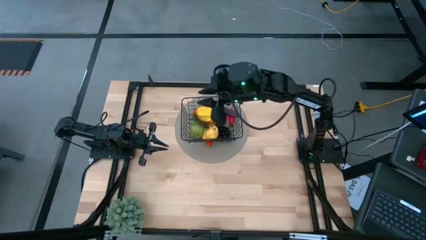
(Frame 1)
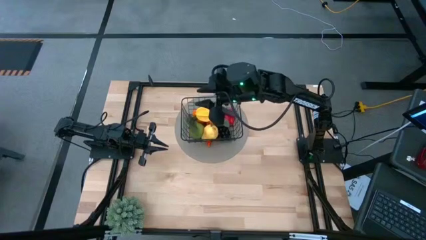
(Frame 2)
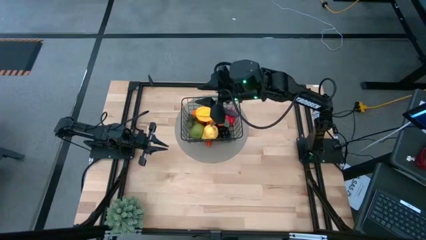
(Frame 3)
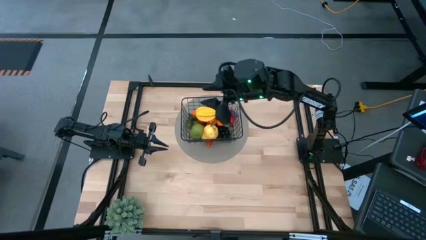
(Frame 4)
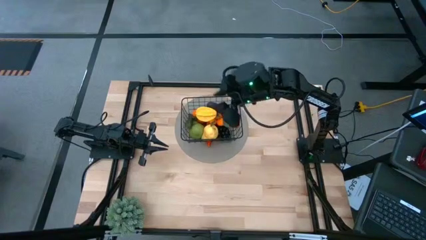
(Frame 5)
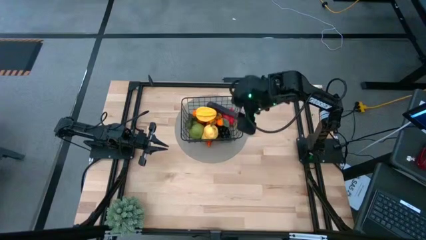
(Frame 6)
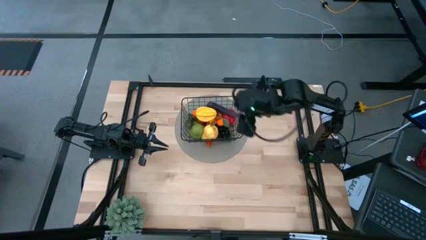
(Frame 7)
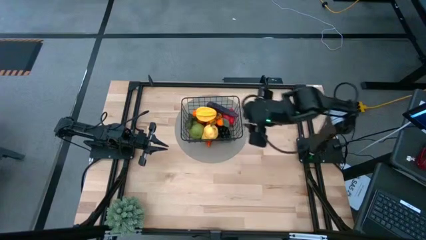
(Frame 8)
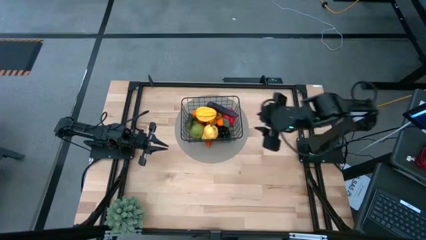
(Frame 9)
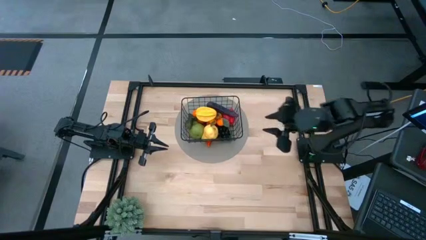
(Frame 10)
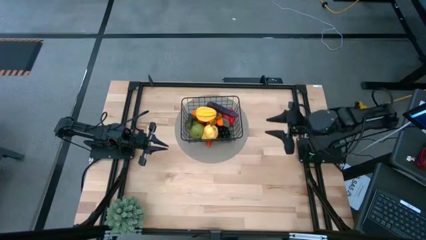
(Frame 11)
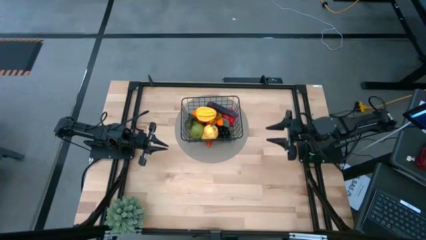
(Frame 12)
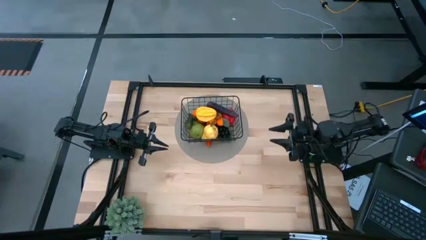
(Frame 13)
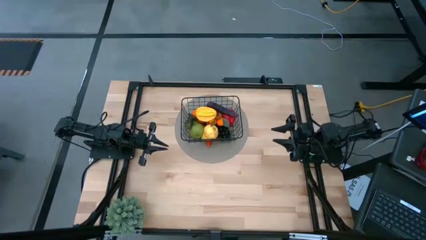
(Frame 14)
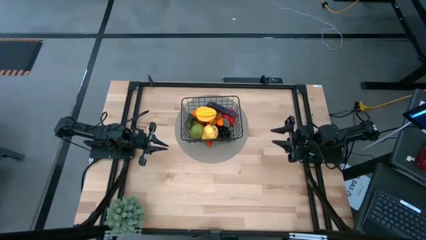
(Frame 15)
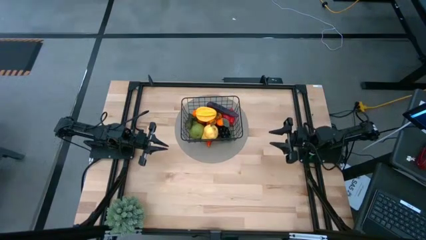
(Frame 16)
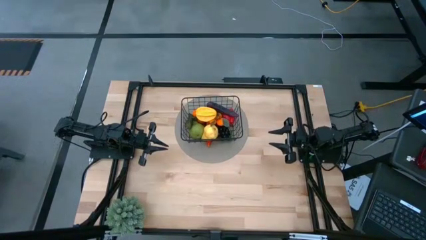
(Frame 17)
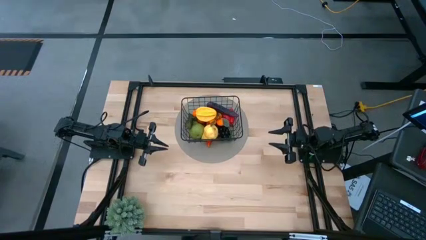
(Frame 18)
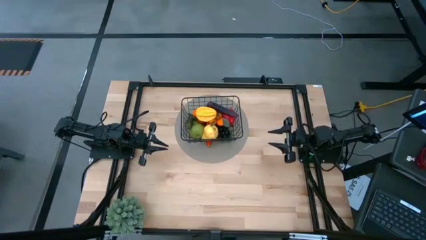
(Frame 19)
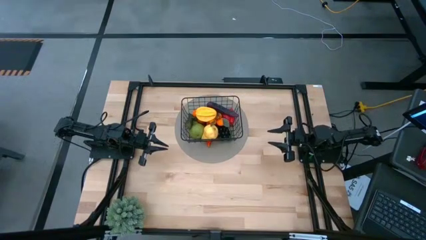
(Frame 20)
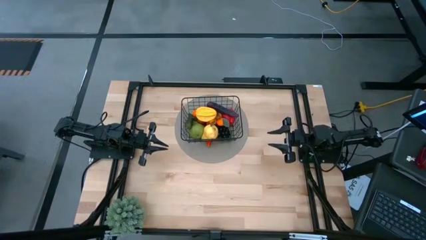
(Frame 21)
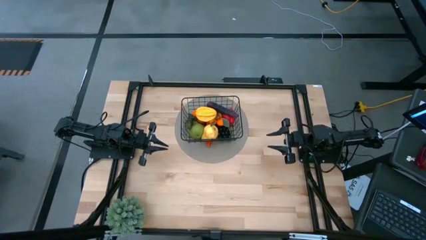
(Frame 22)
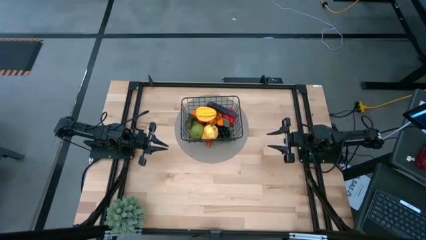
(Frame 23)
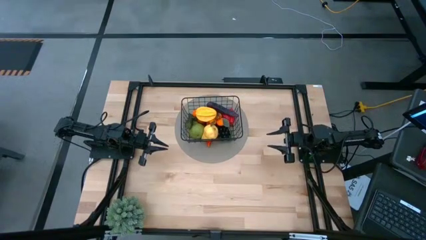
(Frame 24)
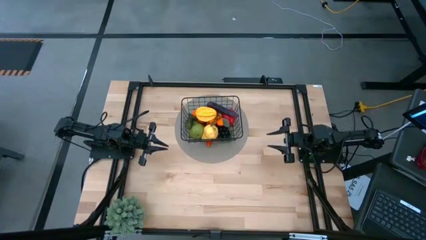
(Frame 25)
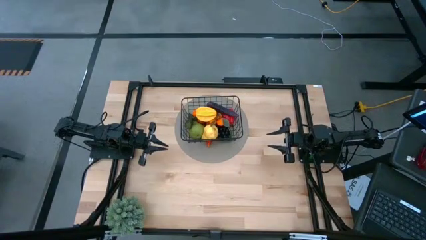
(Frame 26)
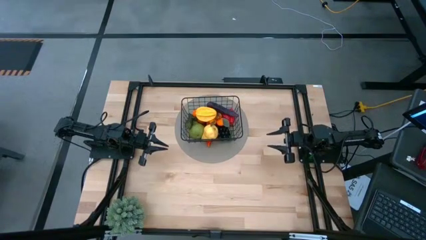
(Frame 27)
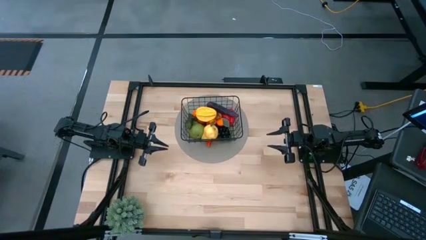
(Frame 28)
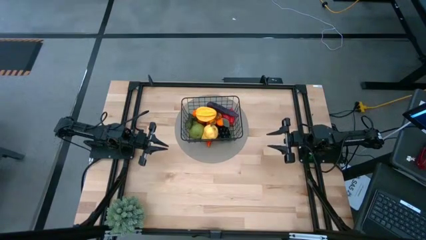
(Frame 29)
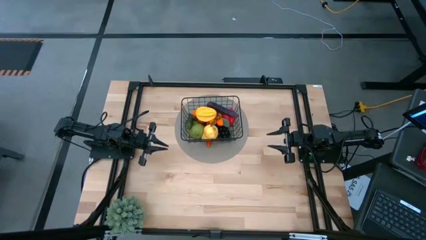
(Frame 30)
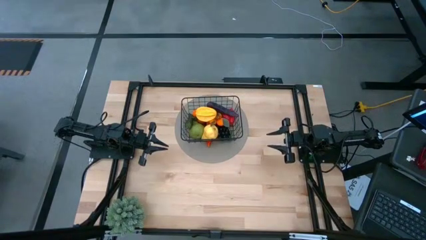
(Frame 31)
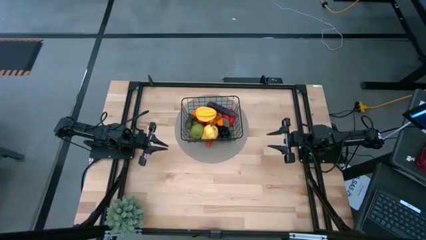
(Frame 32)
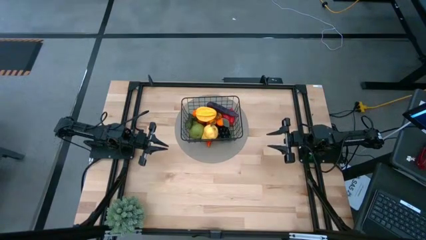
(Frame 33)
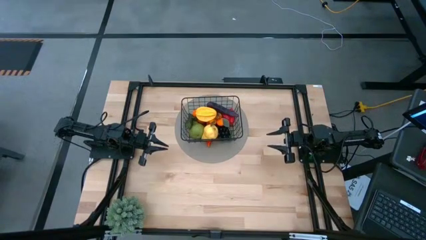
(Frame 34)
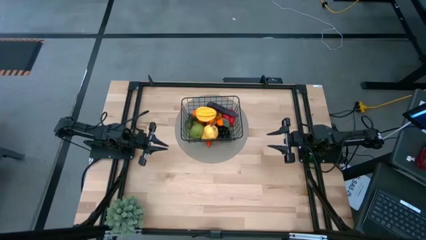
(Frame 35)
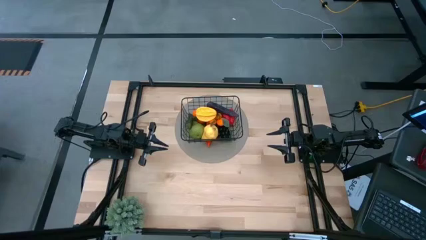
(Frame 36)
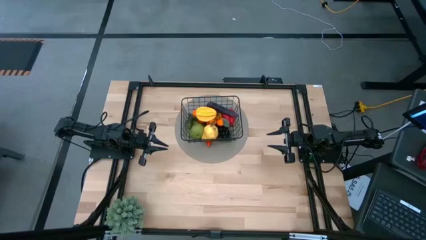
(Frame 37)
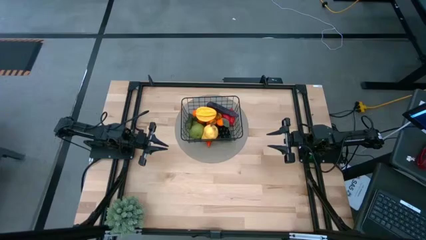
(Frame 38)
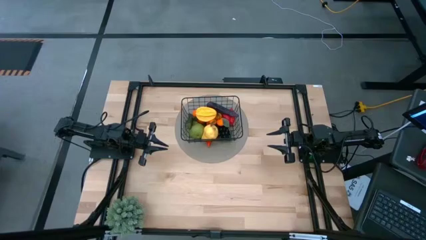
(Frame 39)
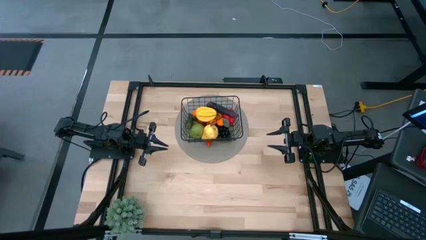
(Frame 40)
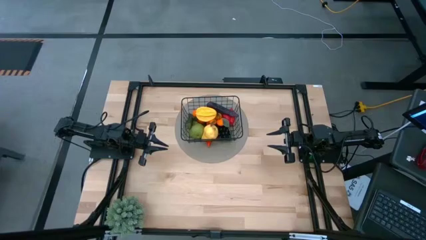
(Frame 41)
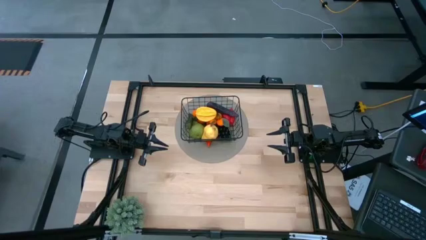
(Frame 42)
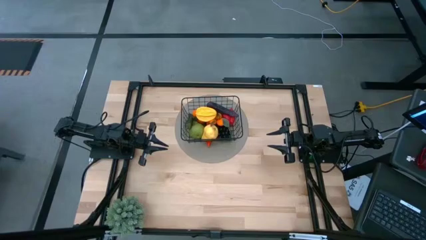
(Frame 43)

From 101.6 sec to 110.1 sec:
Task: Build produce basket
Return to Home Position

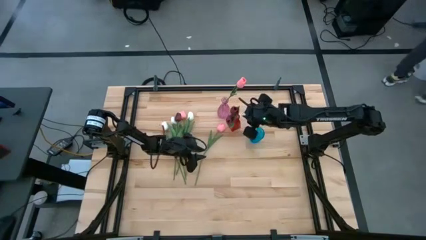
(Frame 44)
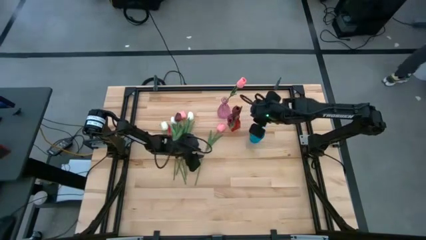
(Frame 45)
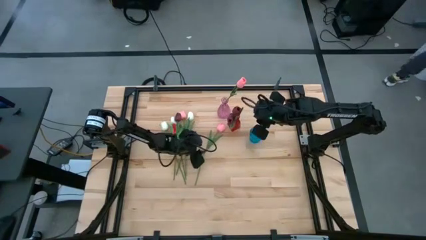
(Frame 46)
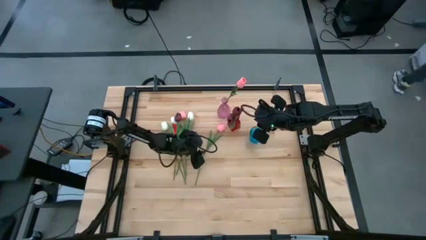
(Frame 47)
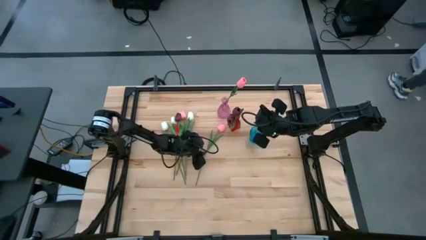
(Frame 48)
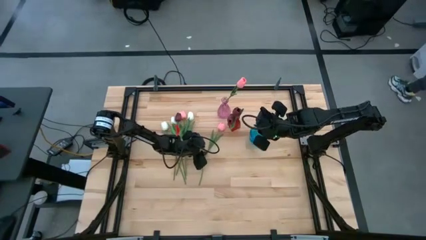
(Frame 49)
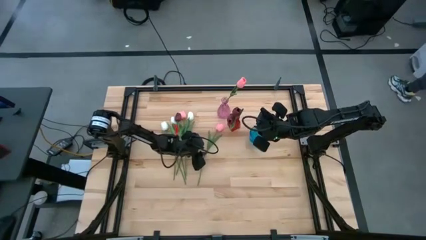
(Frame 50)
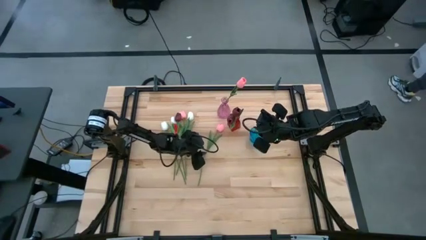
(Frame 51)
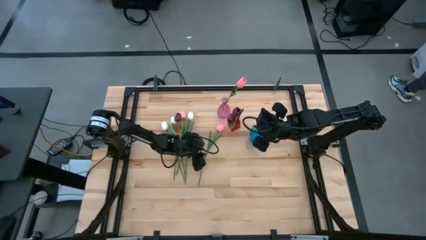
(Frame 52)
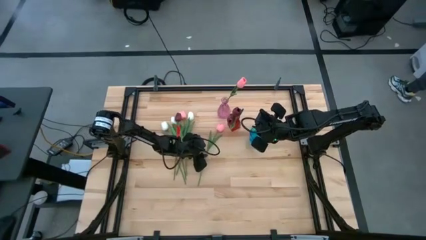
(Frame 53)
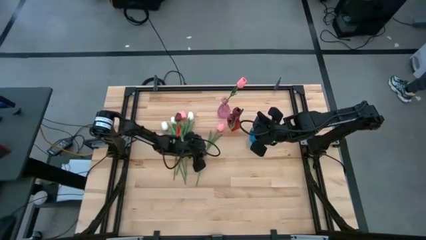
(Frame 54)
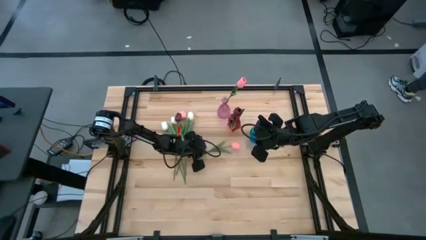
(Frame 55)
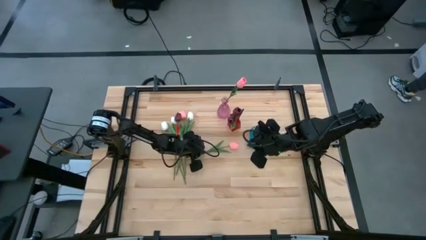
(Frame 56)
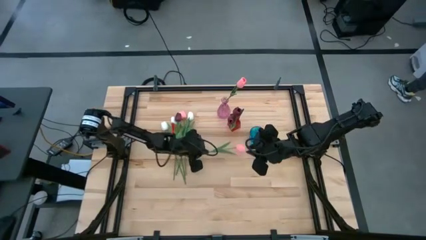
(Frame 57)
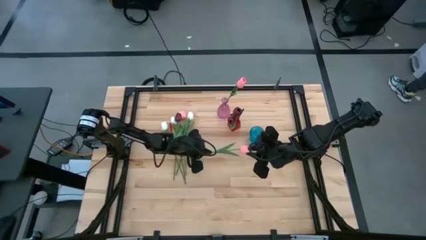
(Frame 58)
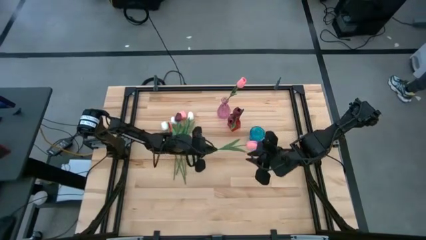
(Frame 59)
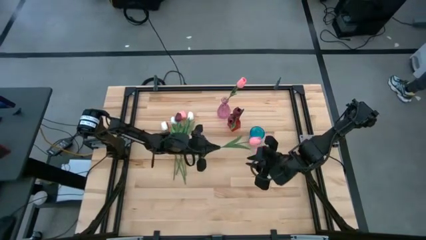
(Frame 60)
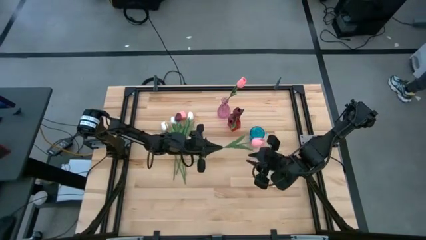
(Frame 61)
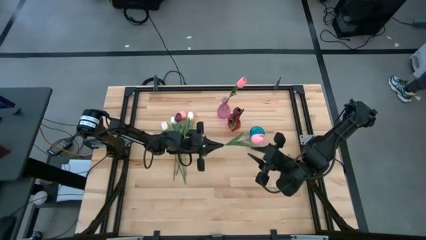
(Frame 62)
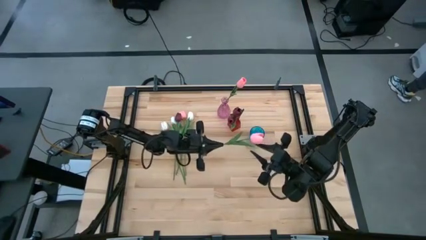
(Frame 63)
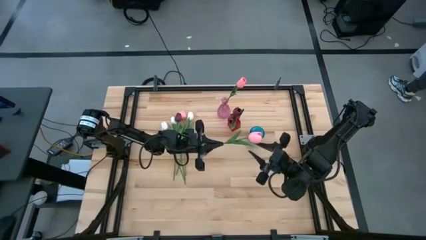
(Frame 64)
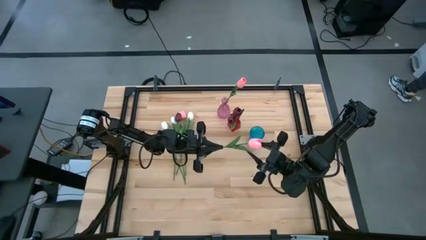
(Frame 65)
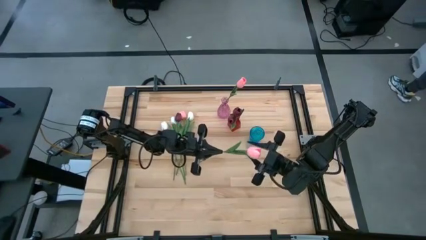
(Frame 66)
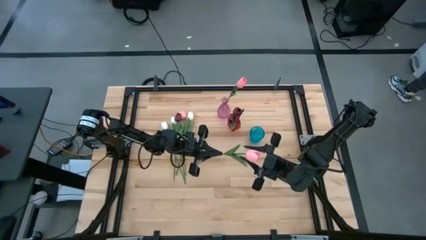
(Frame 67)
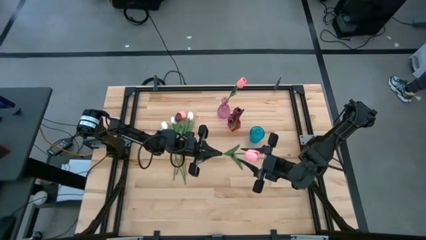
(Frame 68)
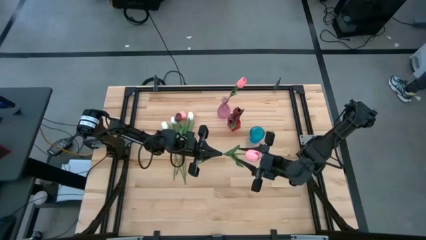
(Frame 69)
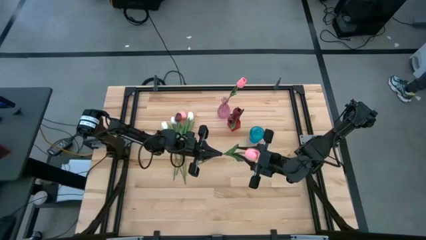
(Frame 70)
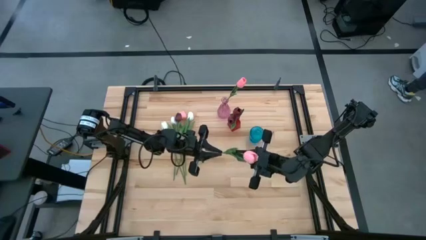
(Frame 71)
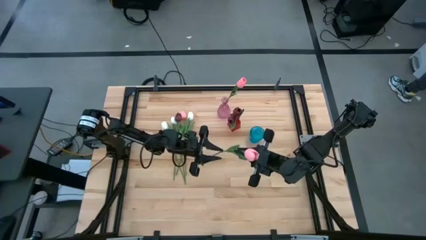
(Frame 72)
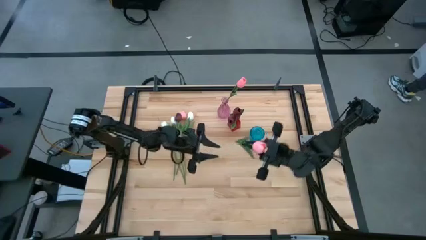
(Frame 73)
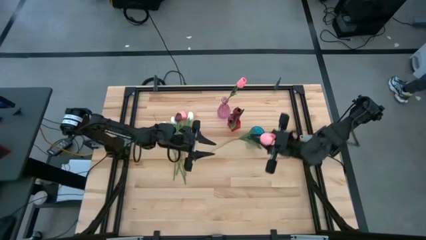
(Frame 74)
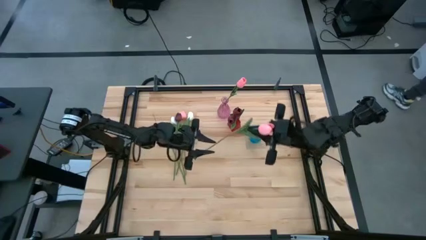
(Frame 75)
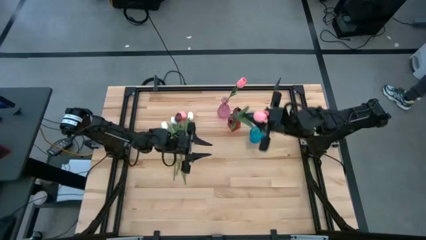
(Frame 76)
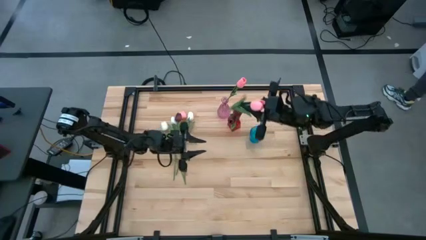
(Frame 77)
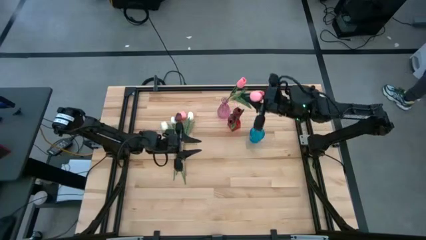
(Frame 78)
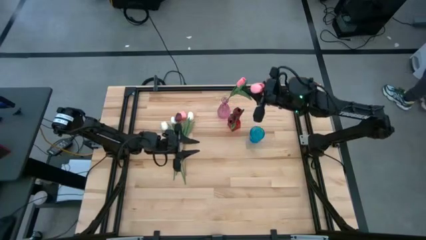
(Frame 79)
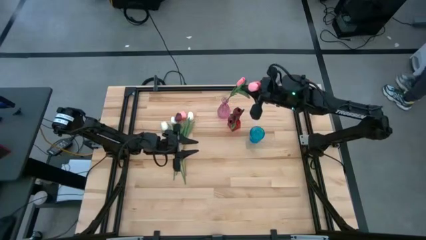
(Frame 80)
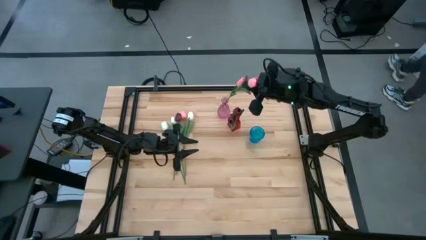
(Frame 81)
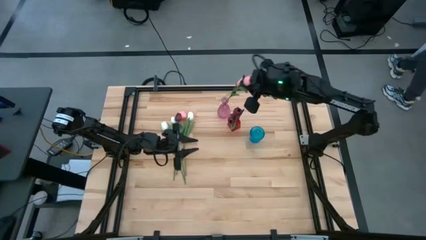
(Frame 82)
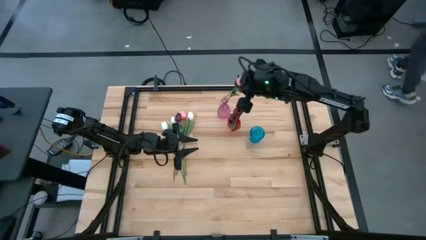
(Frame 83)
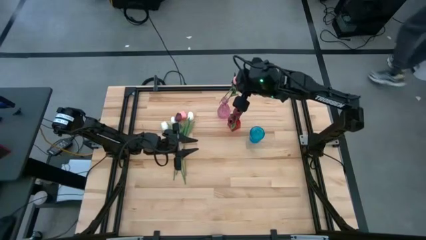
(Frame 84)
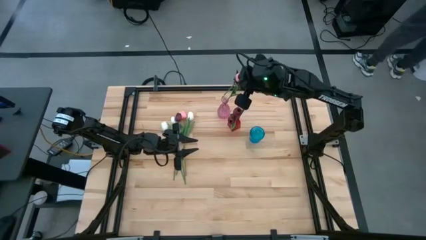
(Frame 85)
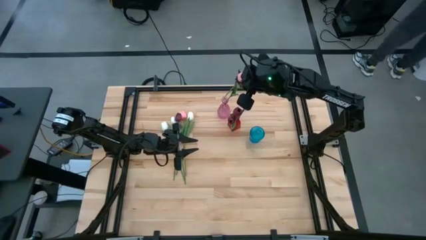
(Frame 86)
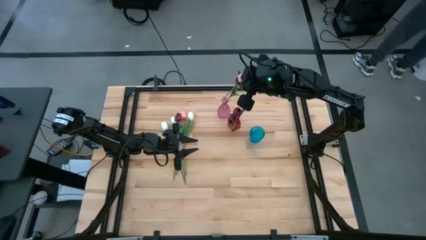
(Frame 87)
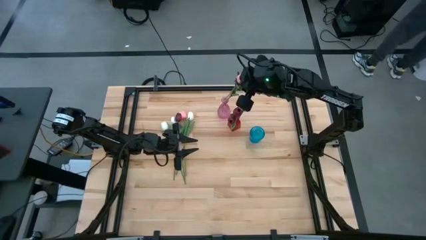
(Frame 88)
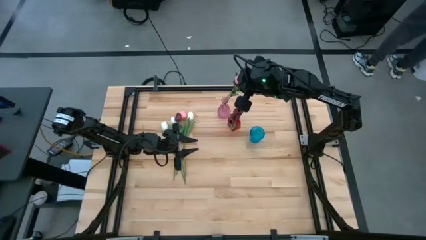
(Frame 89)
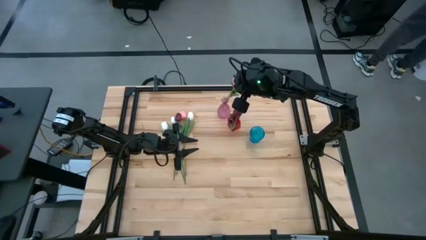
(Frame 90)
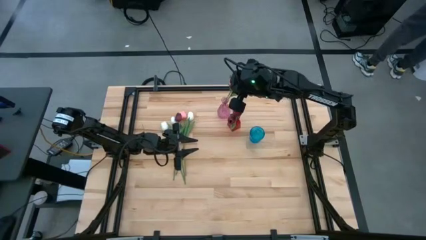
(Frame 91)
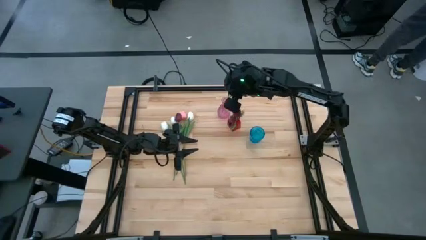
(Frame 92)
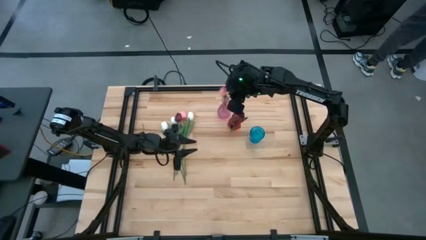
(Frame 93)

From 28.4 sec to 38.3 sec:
Task: Sort flowers into vase by color
Put the pink flower into the pink vase
